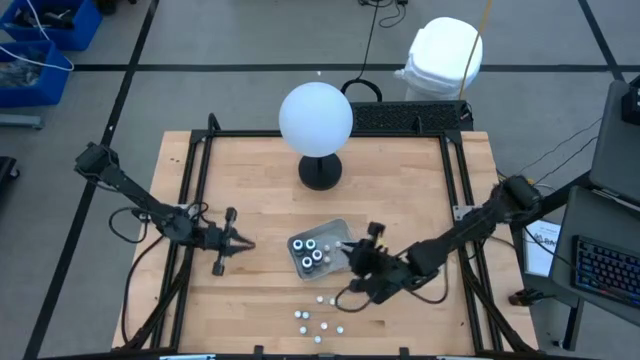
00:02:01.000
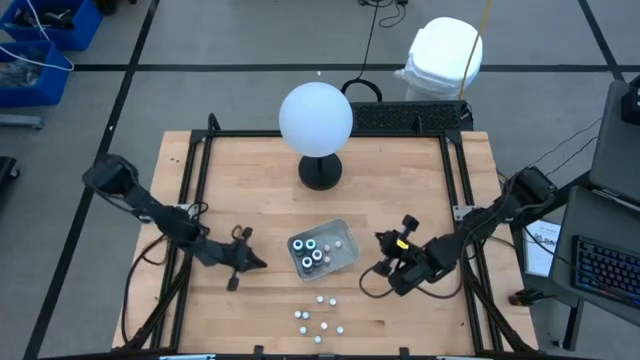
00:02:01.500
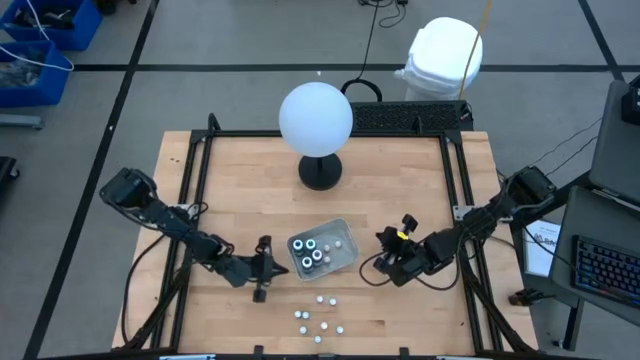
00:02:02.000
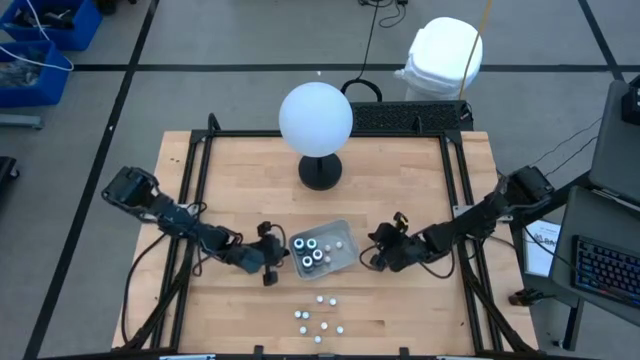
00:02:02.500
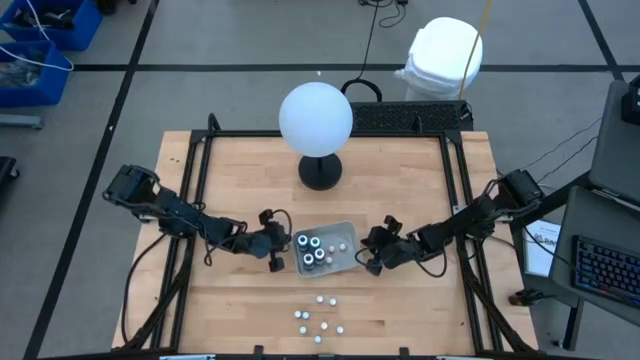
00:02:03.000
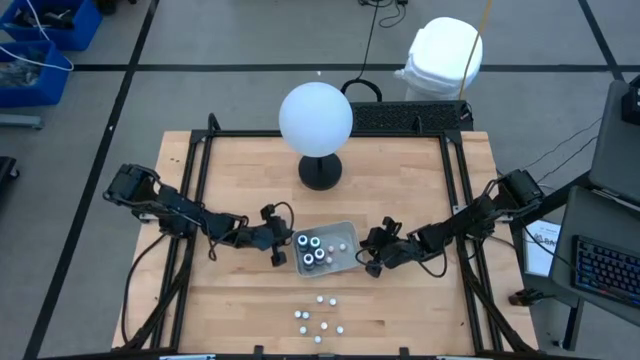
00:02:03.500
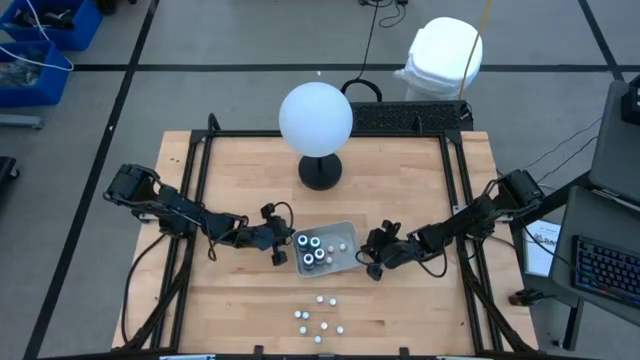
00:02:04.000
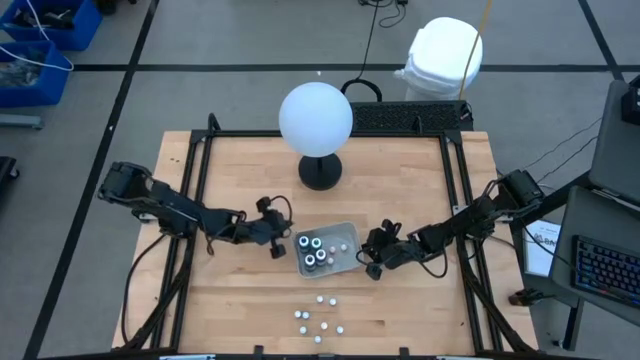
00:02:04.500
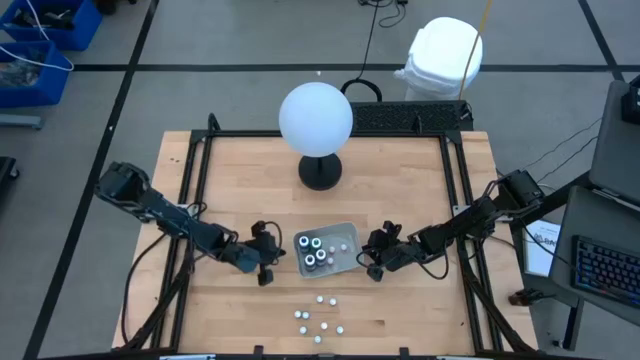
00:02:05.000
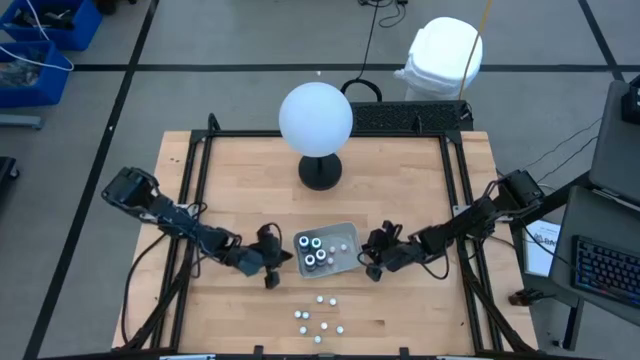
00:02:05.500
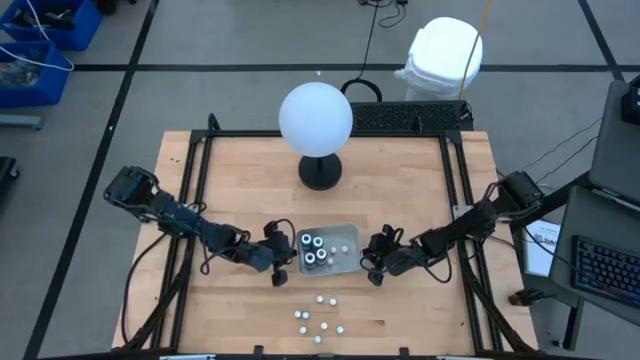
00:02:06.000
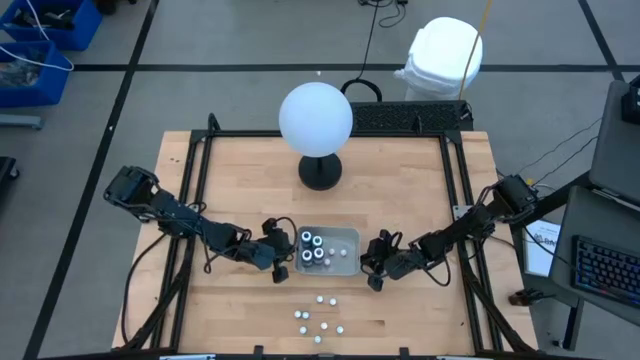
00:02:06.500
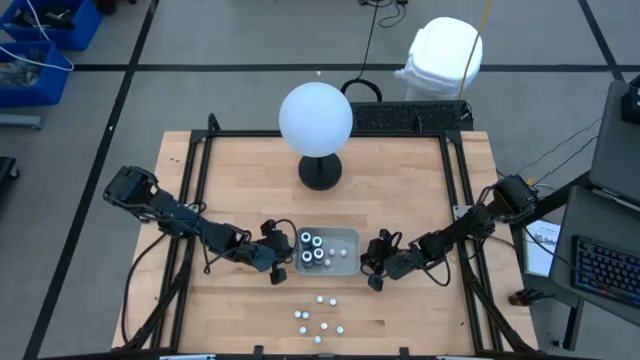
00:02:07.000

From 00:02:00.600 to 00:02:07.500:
Task: Pick & Place food coloring
Adjust the gray bin

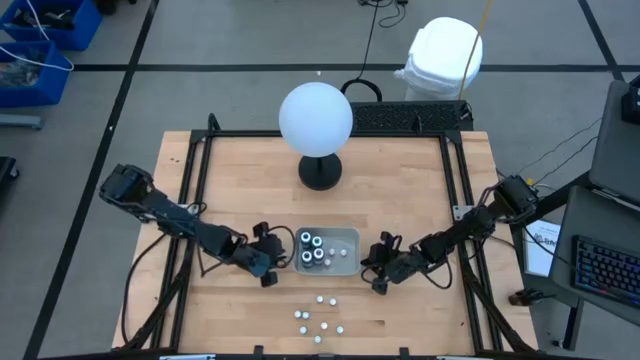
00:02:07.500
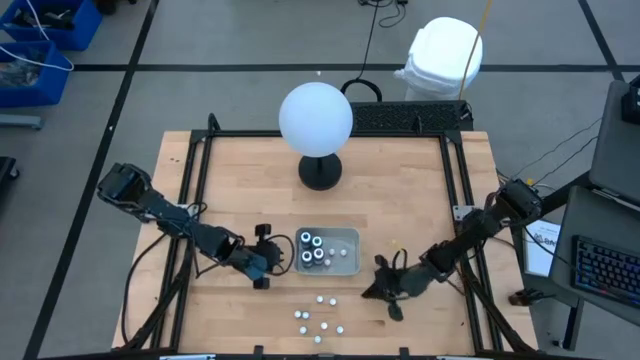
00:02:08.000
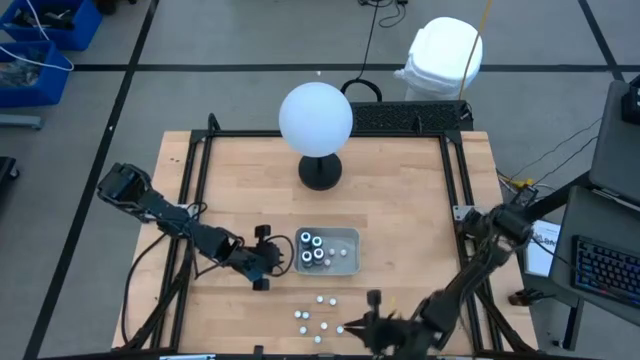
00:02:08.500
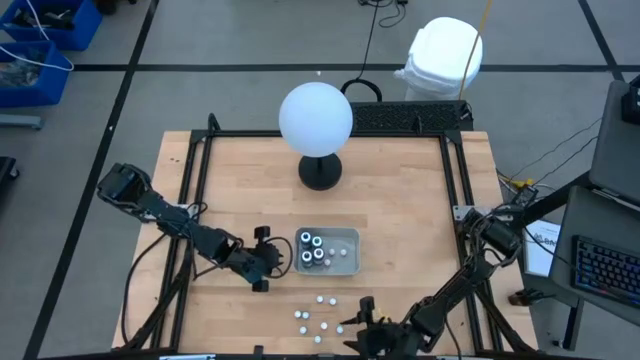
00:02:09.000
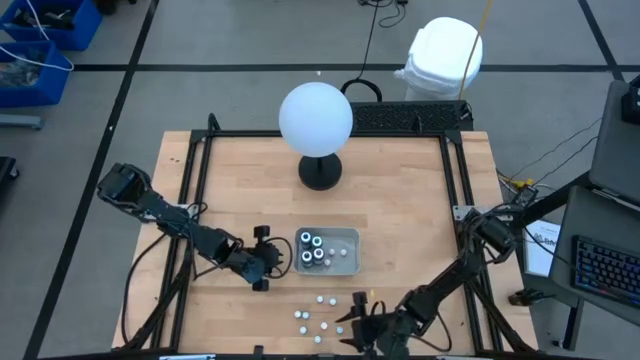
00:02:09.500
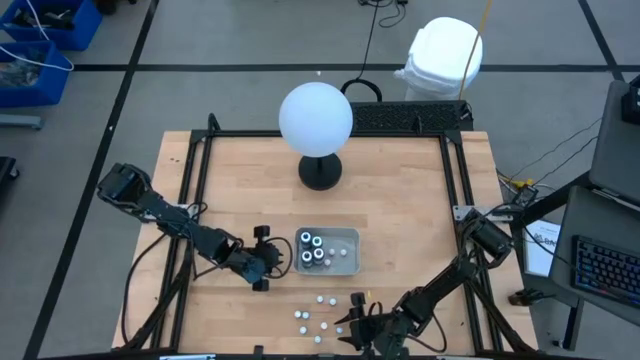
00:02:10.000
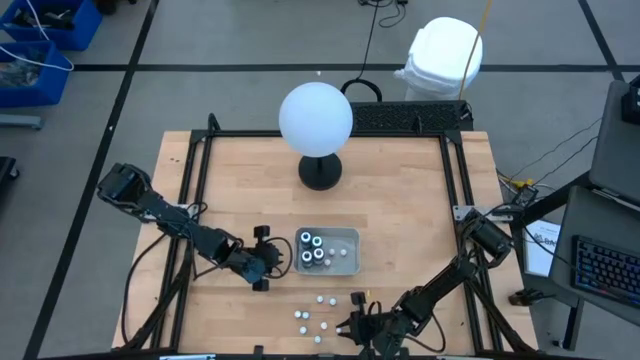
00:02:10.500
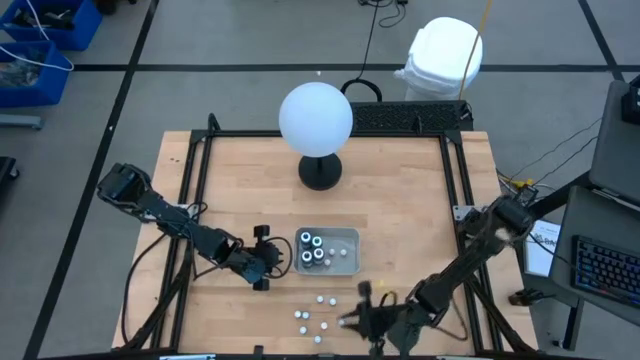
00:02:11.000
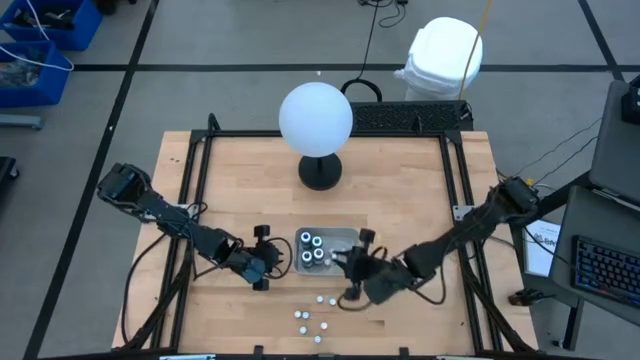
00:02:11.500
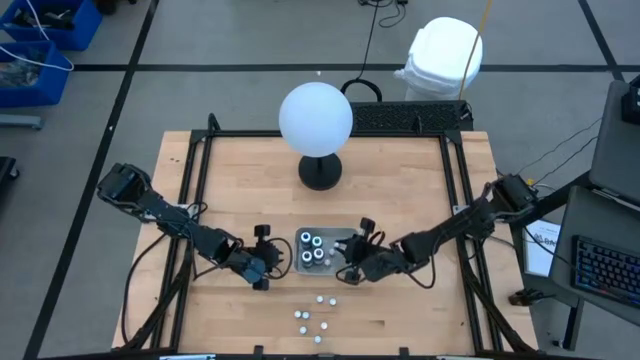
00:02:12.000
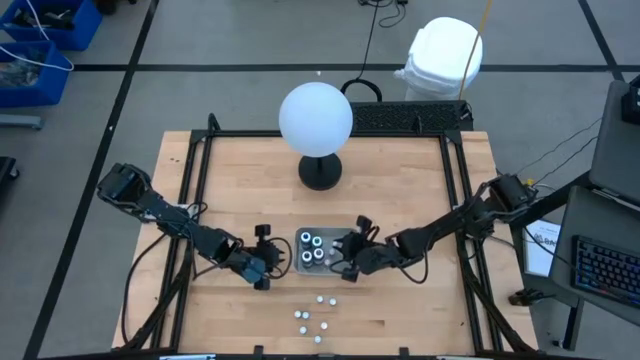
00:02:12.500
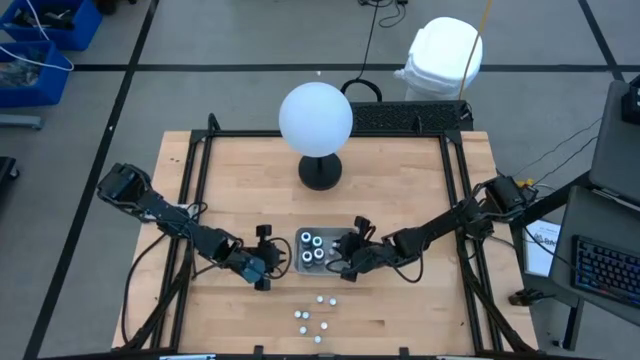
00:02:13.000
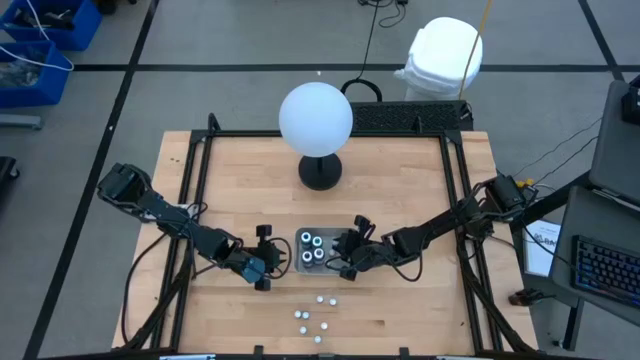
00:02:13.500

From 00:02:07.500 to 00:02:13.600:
Put the small blue food coloring bottle into the gray bin
